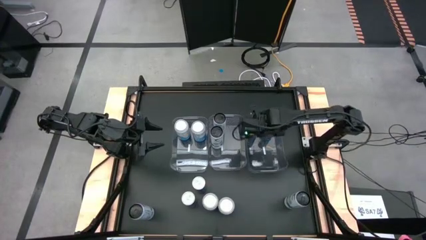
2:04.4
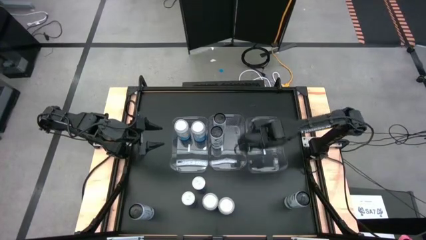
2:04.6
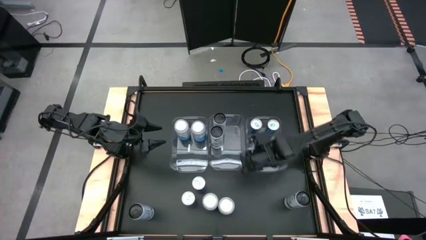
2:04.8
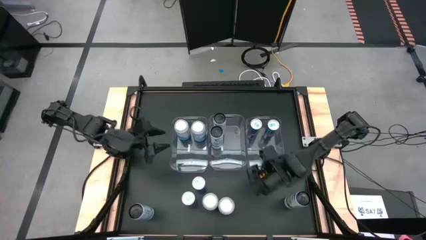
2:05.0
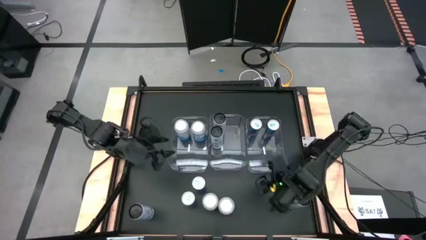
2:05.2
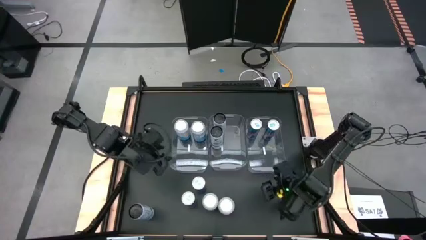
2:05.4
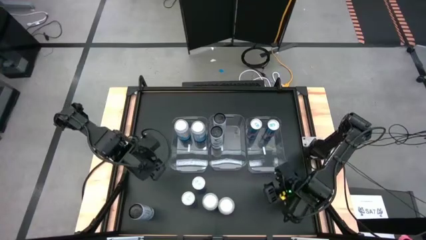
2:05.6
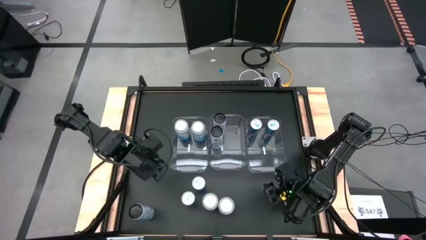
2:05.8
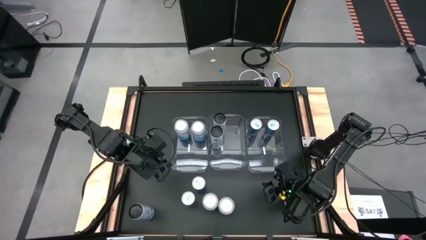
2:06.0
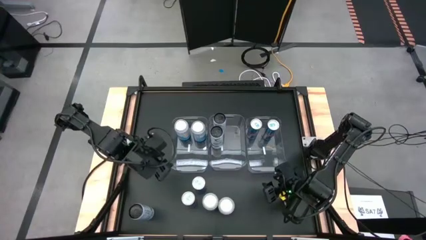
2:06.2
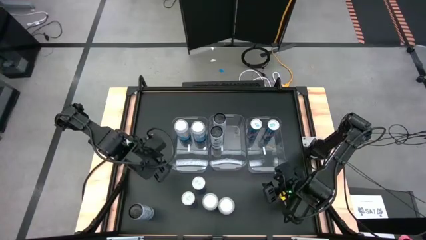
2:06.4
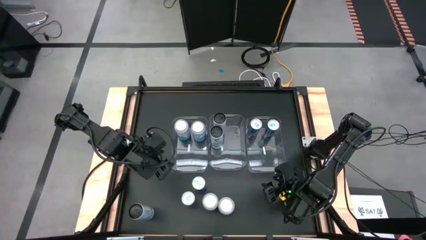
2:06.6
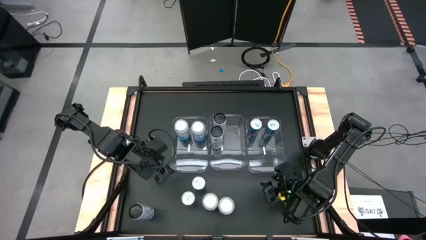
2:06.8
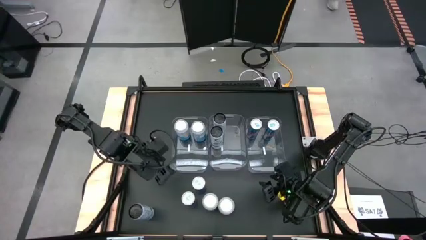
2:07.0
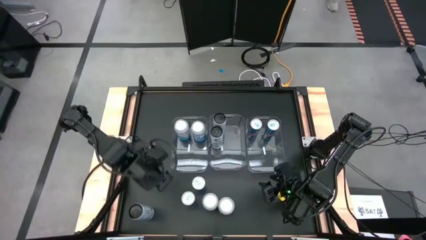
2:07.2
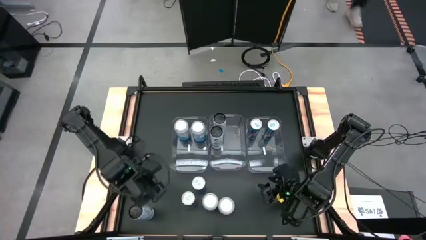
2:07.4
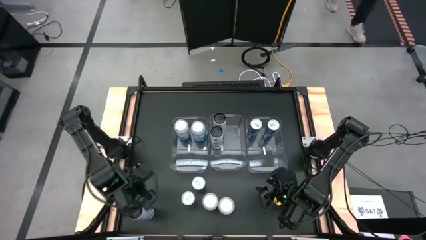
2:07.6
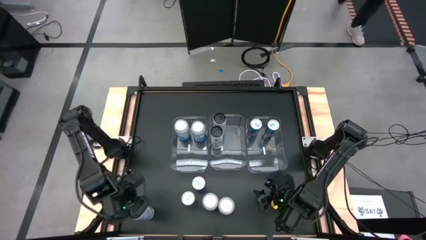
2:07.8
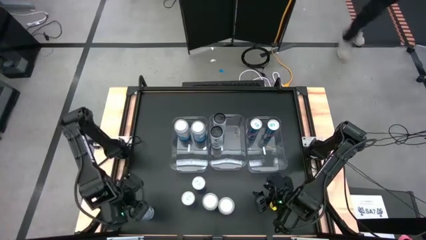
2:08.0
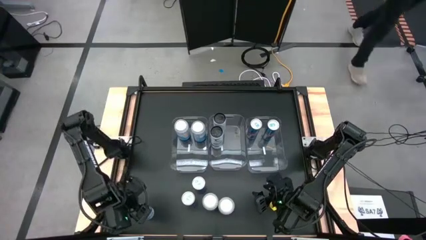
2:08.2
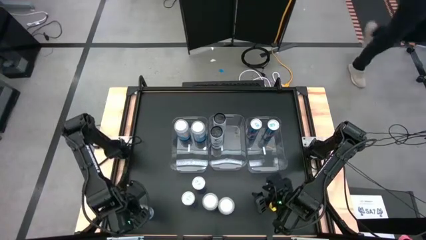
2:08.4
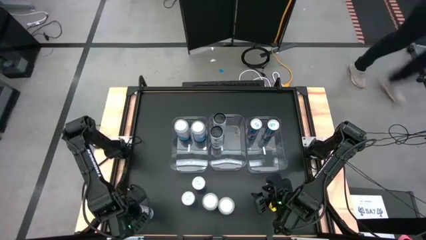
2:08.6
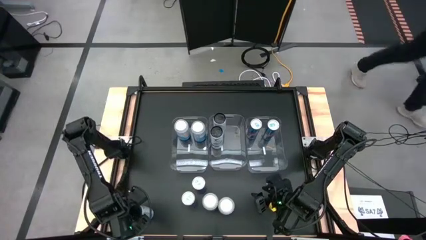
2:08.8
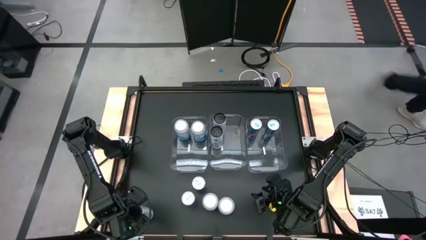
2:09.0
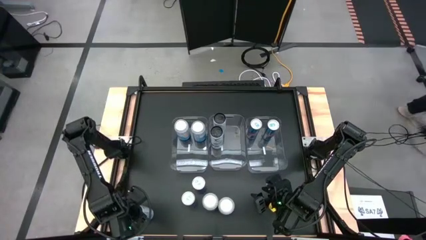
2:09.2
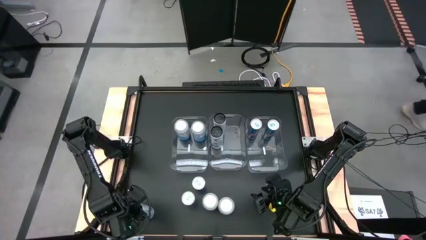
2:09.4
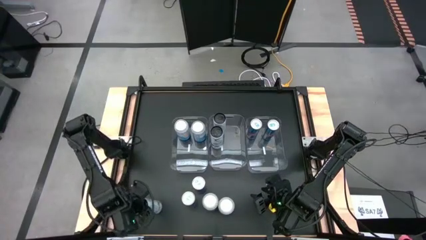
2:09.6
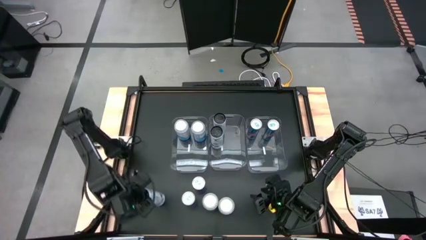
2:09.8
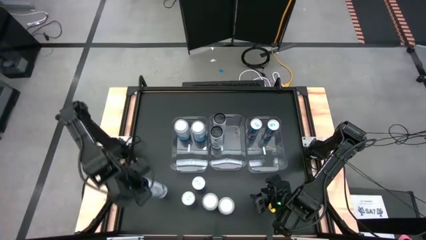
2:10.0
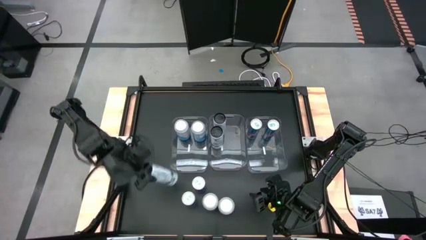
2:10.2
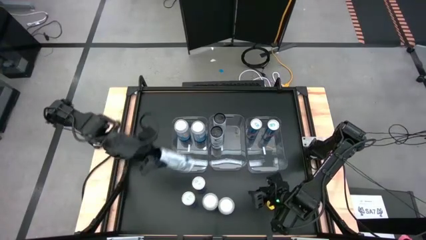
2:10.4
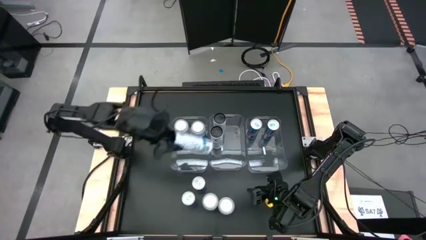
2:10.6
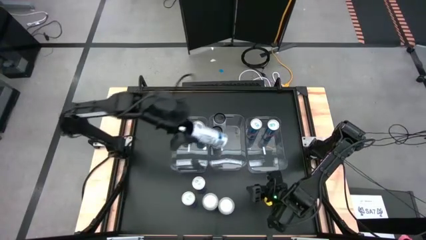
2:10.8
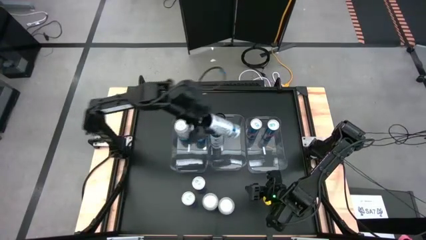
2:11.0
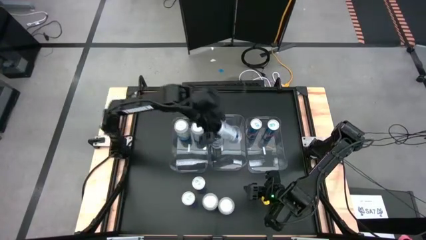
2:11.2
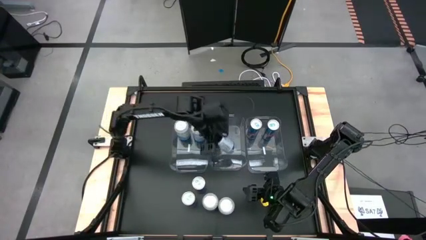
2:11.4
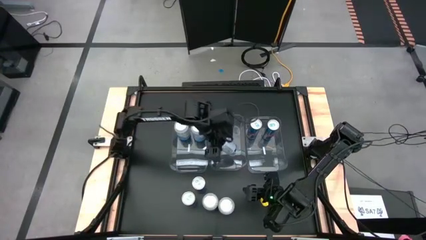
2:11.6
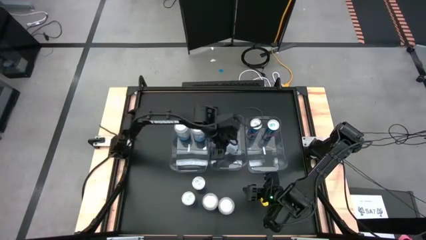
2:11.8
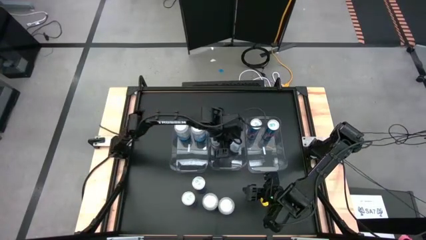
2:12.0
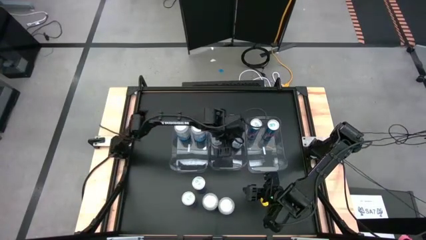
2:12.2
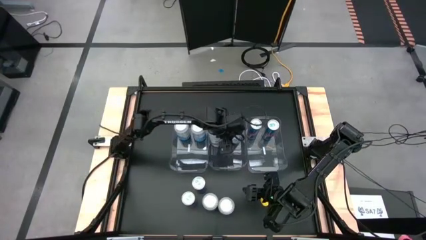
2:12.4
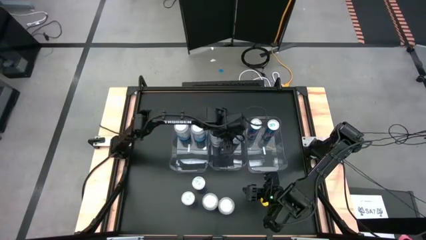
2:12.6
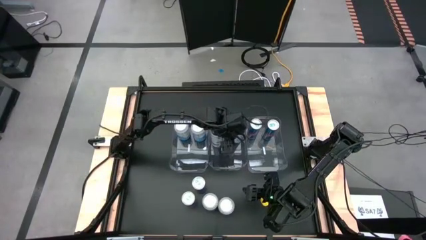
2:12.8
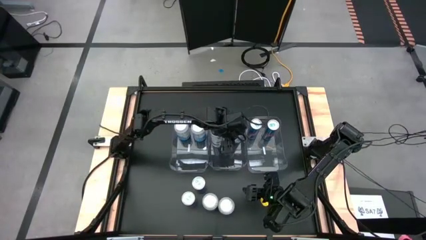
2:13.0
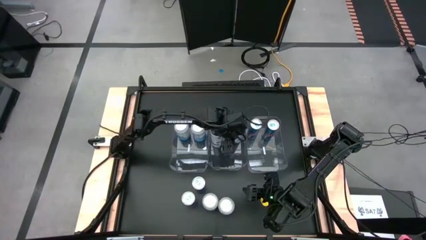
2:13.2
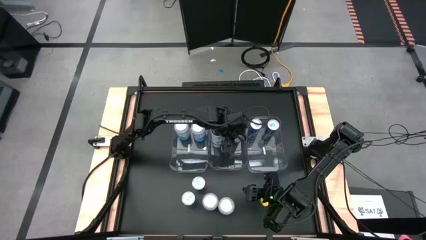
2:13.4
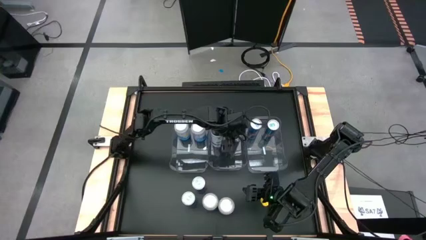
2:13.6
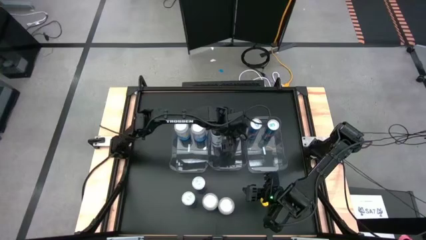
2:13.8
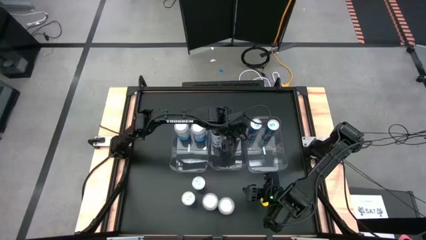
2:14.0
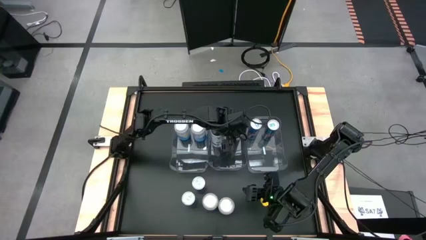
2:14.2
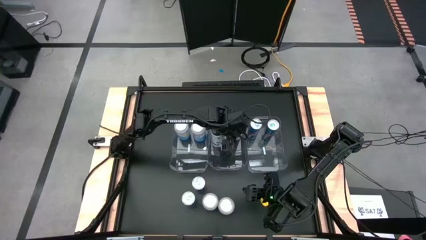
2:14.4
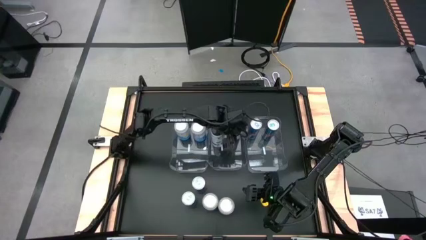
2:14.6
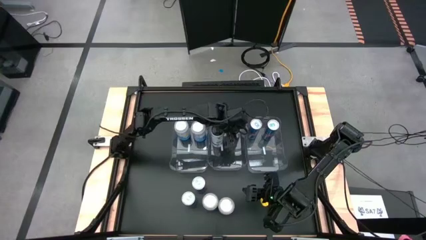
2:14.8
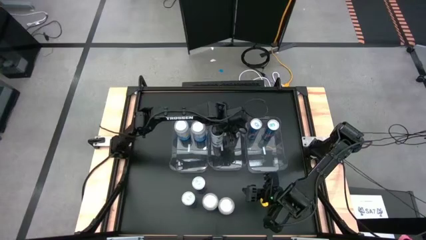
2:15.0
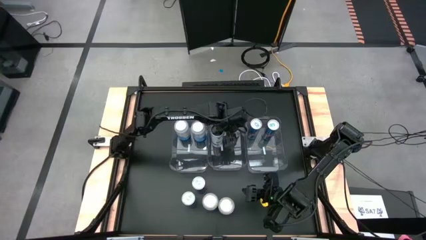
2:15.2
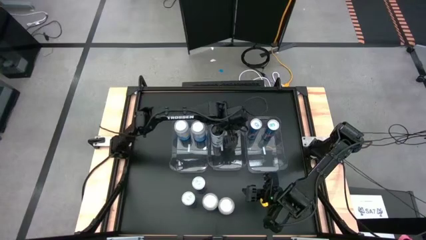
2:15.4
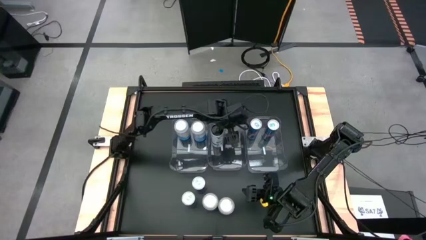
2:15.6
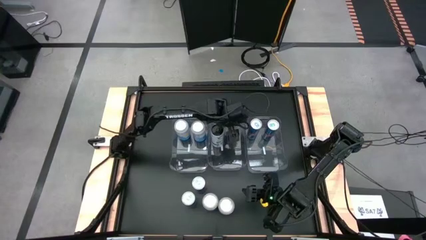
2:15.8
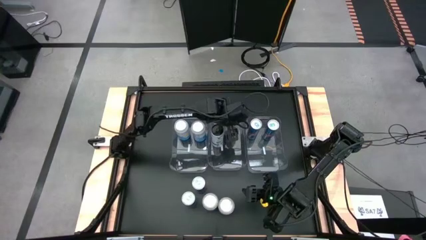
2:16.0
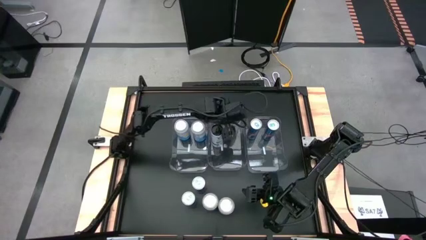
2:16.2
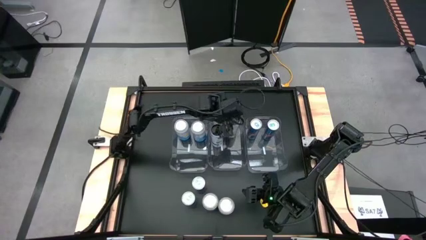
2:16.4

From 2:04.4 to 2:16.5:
Task: Sort soda cans
Put the left white soda can into the middle transparent bin

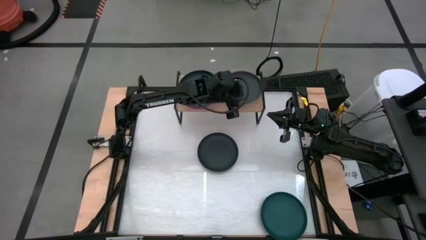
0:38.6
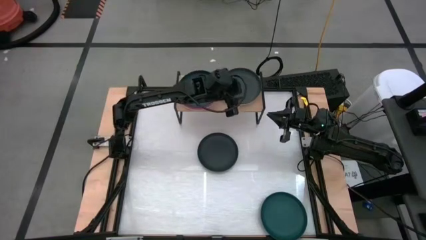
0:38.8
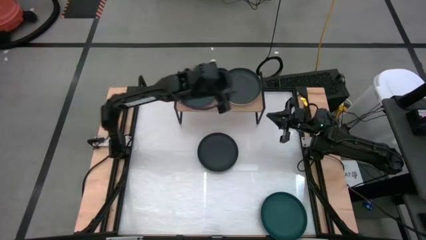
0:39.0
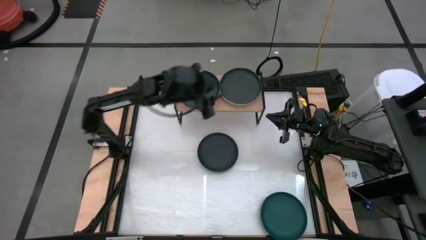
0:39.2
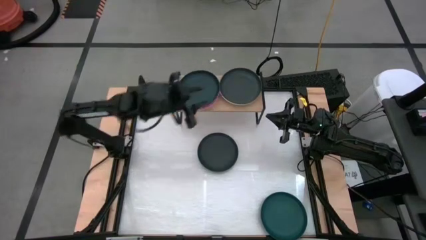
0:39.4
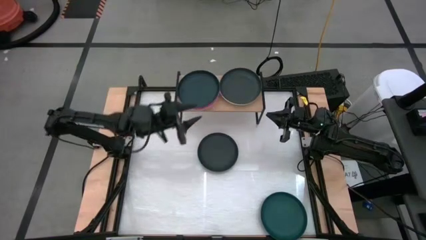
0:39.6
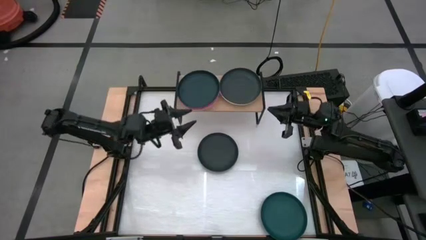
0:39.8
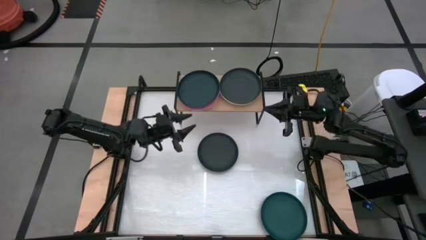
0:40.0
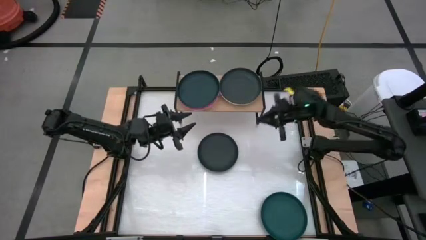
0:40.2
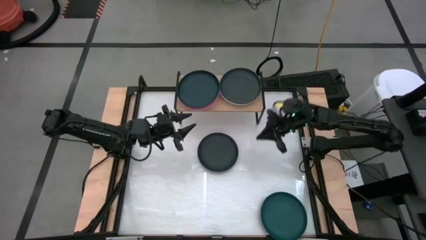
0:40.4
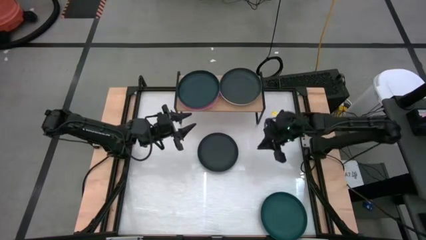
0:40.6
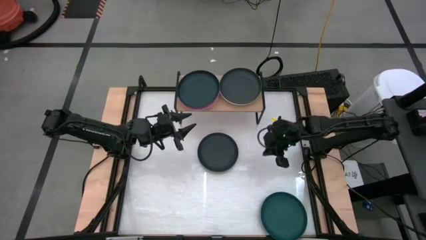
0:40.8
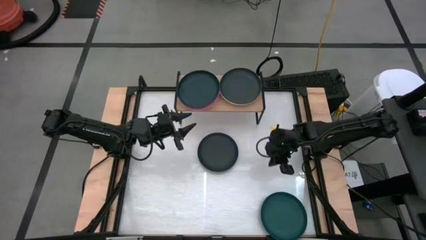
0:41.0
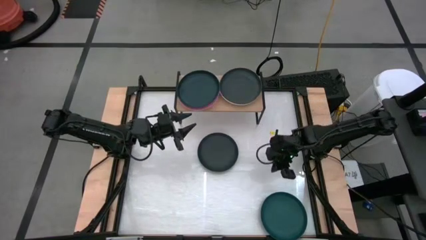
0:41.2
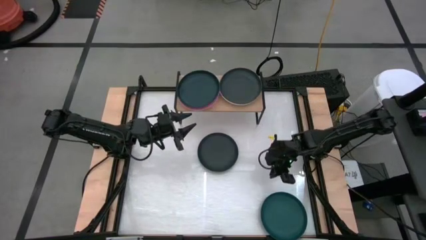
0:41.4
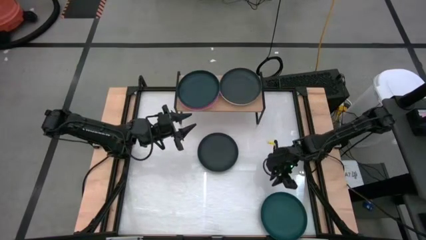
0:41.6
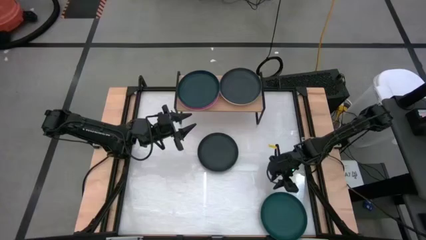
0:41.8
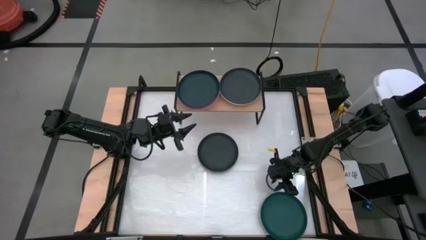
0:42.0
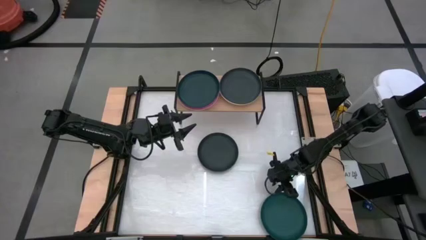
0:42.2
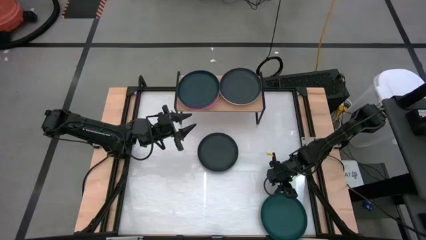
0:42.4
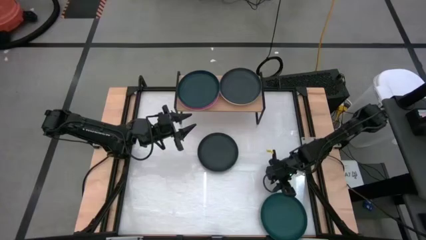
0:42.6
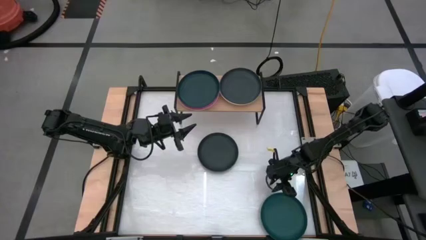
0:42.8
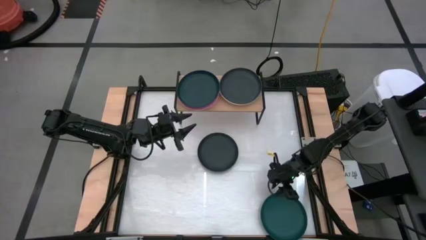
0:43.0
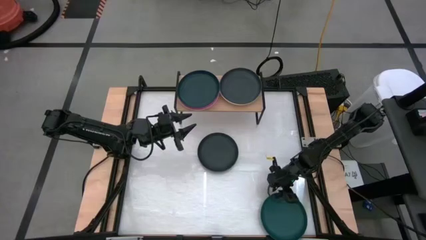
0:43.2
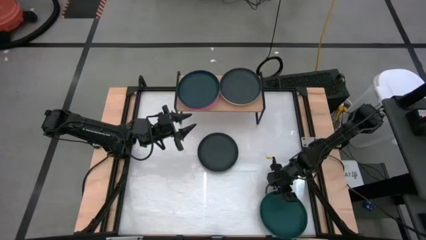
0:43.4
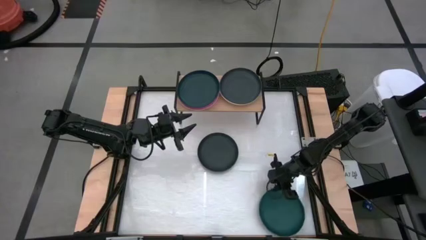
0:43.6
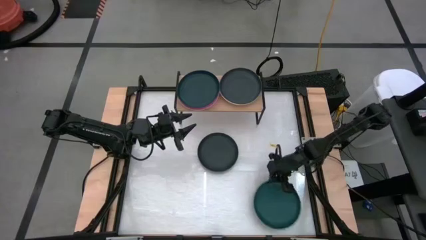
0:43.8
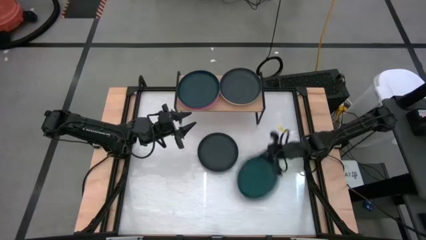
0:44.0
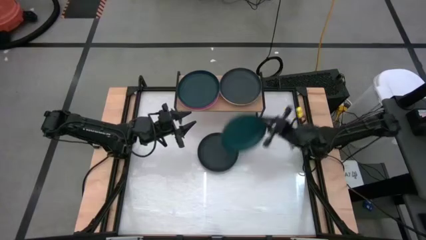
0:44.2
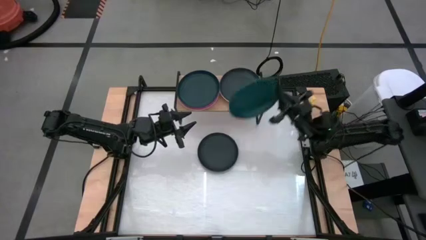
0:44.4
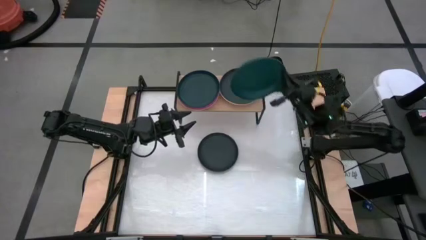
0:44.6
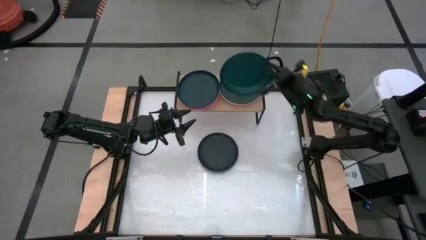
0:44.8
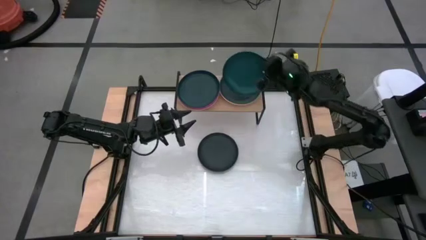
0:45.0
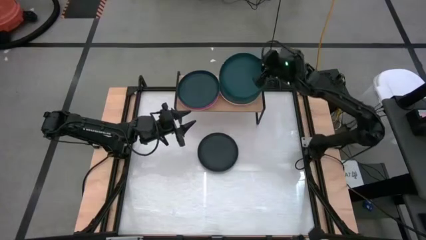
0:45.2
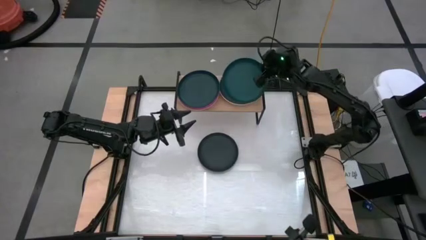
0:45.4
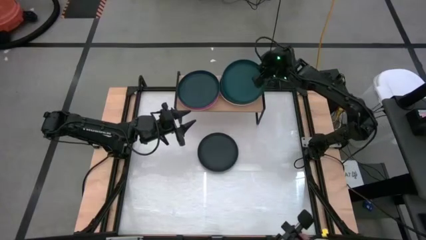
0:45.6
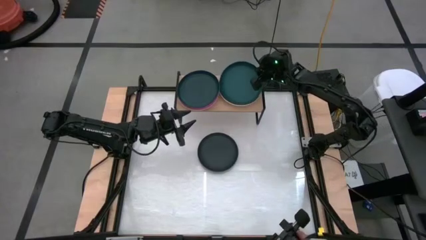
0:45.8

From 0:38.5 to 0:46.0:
Task: Place and stack plates onto a shelf
Stack the green plate on top of the black plate on the shelf
